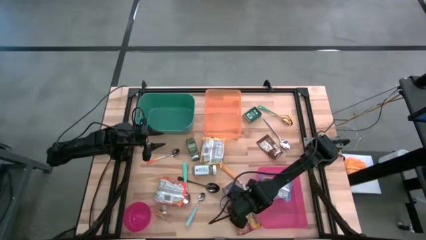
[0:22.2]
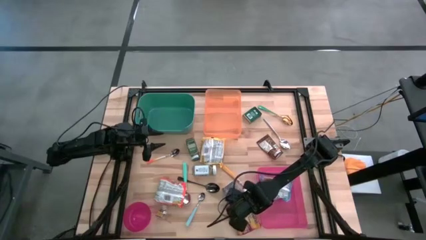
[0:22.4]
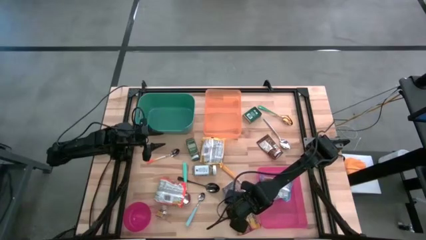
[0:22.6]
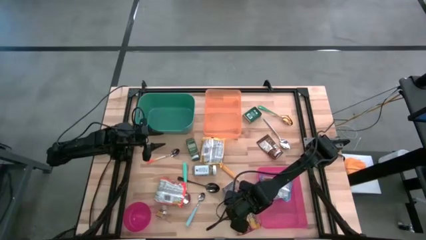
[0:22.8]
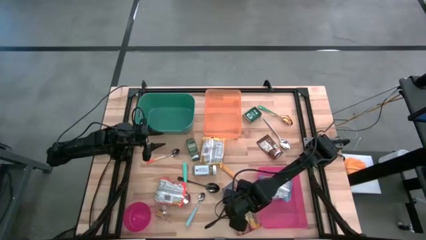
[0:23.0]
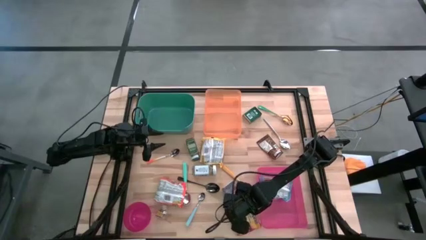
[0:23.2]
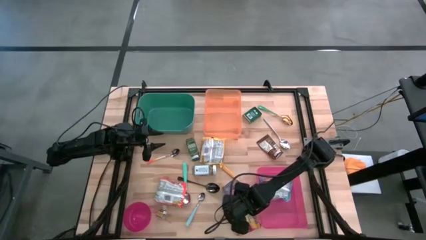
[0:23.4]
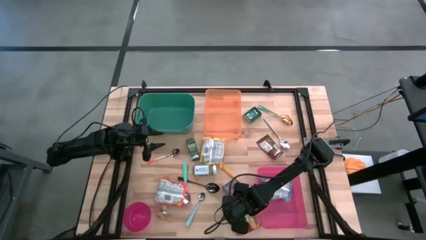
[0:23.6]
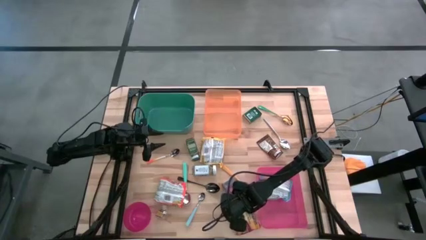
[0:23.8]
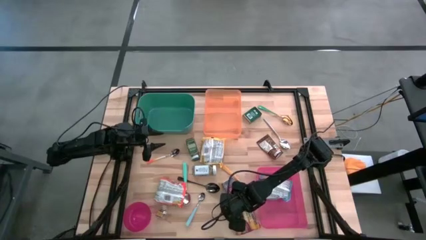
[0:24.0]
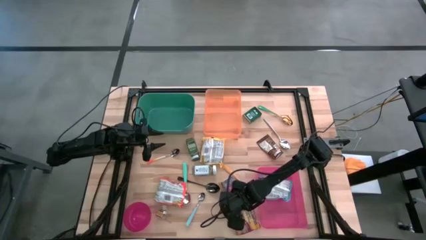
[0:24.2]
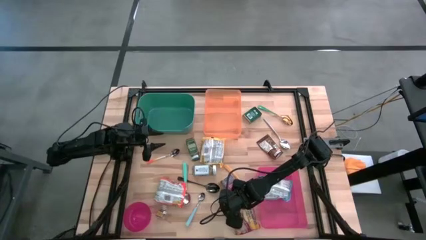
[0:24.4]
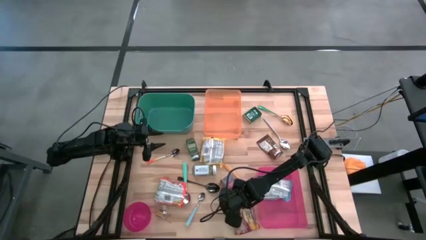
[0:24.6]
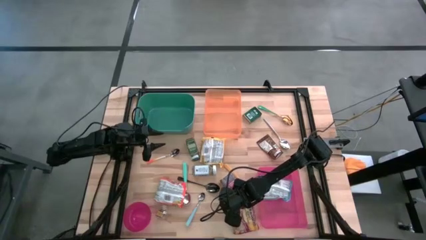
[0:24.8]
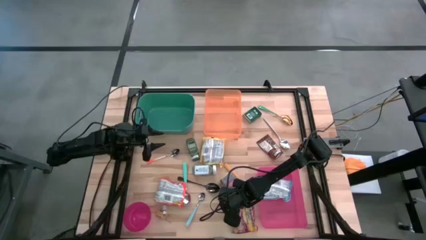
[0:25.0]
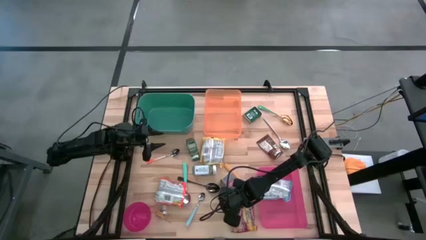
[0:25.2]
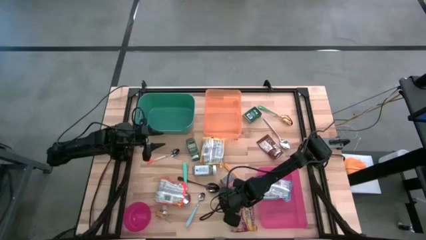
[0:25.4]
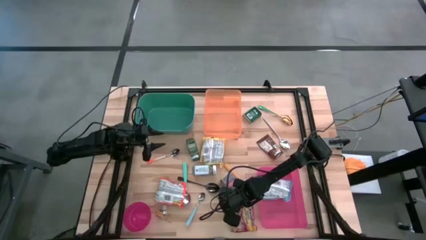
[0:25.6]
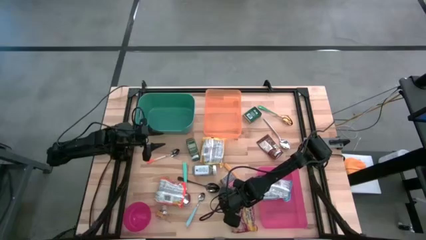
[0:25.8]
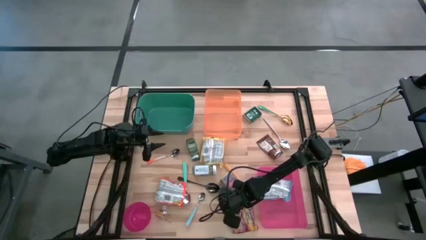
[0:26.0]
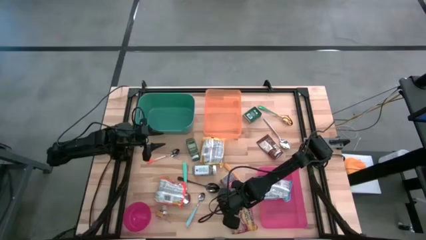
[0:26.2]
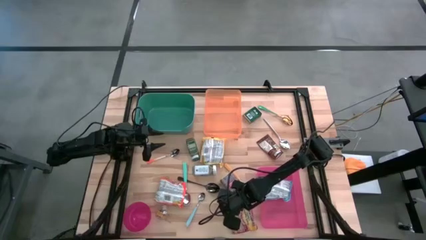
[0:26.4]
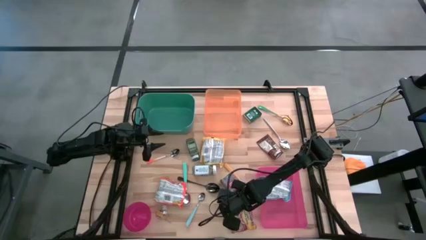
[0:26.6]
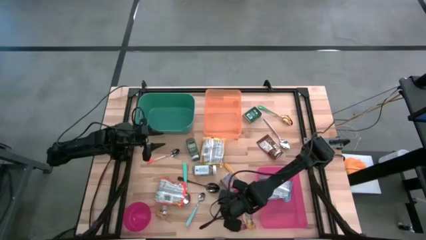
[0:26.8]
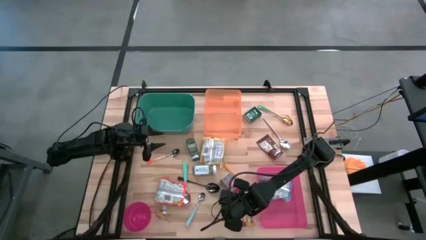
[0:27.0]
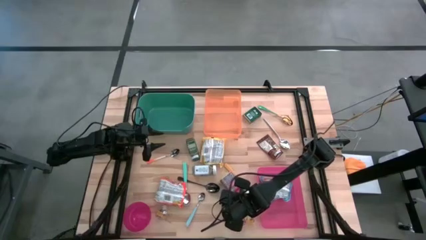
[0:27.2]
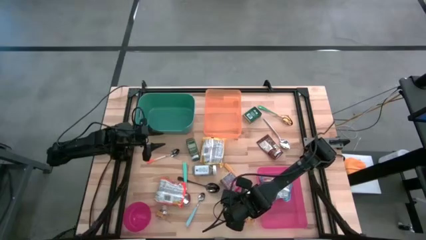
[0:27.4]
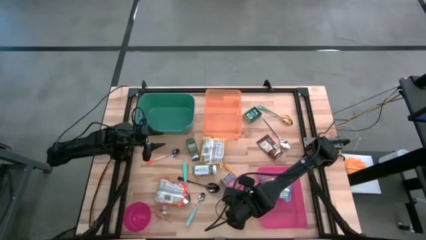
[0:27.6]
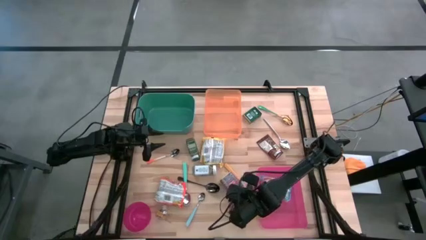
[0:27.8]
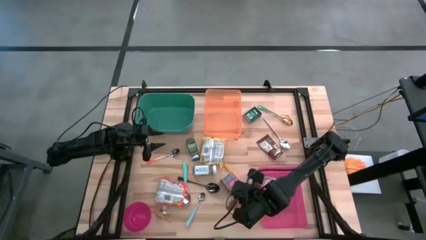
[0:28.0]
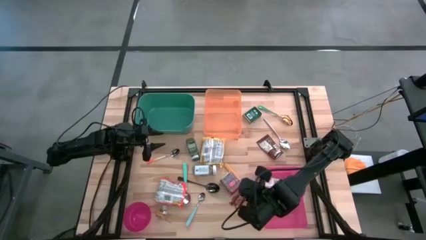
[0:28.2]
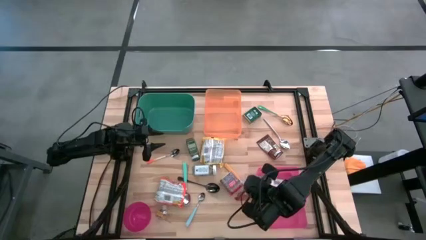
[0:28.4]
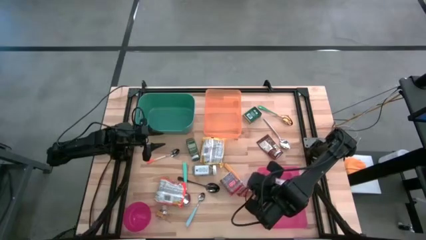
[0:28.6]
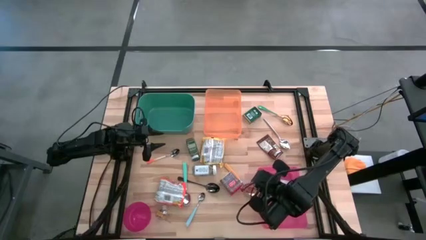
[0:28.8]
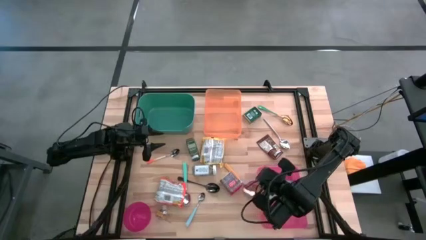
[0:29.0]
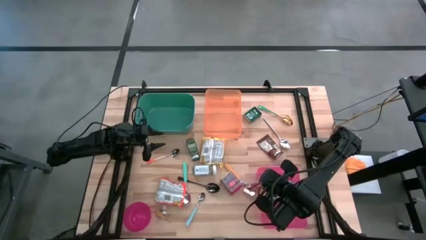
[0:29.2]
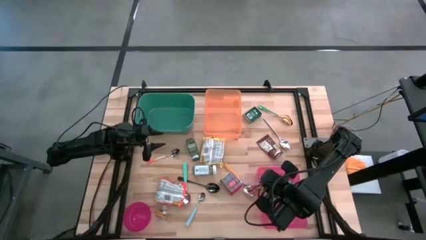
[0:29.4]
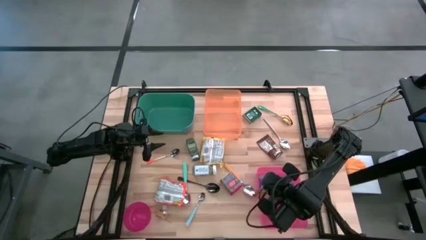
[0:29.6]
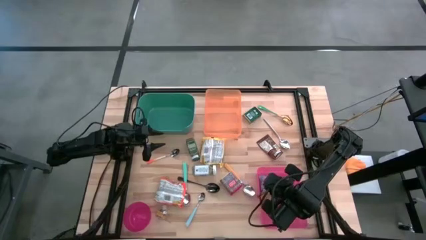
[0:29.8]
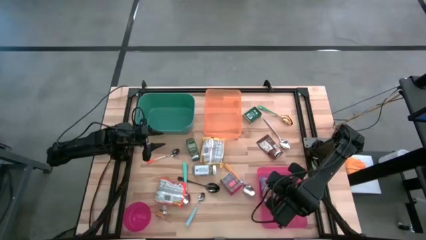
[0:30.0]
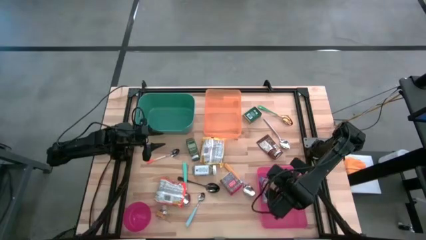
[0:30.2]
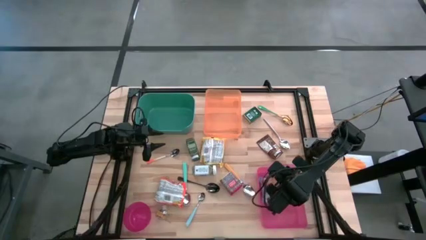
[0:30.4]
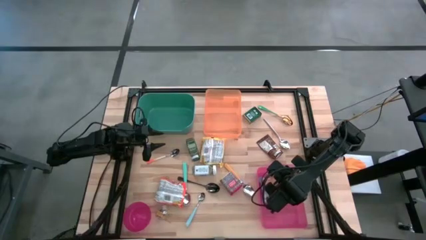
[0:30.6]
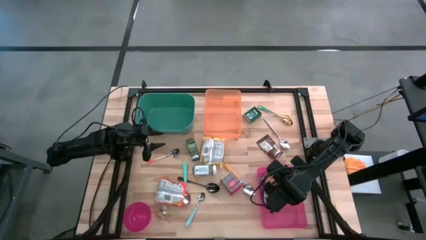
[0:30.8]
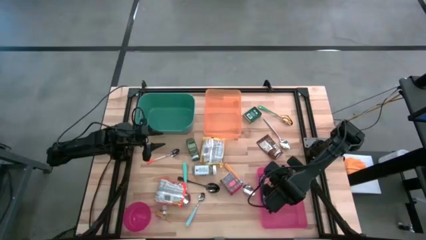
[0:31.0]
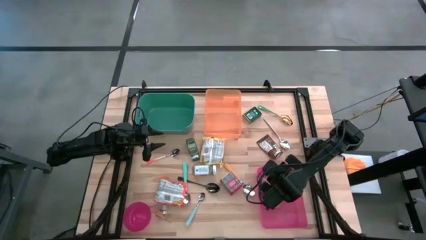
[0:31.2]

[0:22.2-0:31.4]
Put the red noodle pack into the pink bin

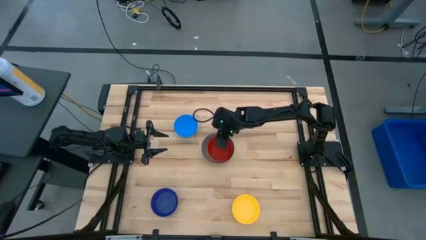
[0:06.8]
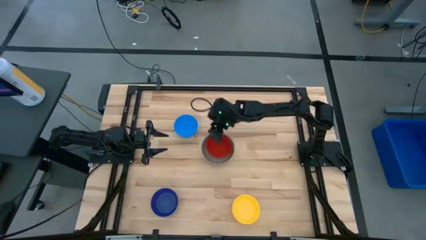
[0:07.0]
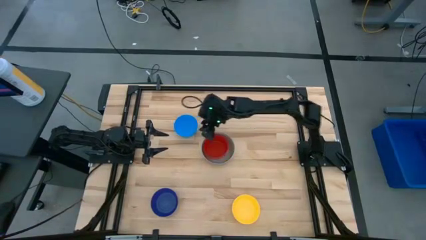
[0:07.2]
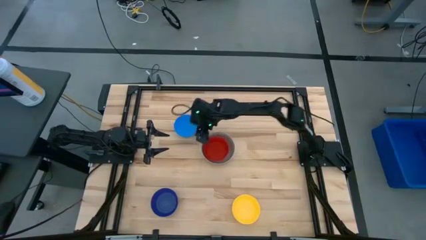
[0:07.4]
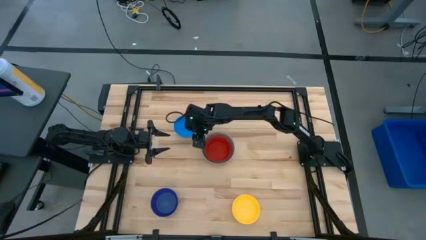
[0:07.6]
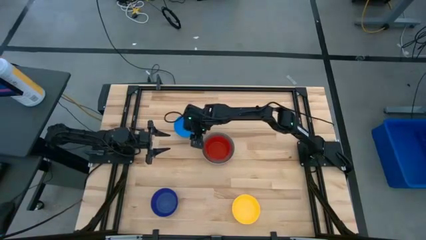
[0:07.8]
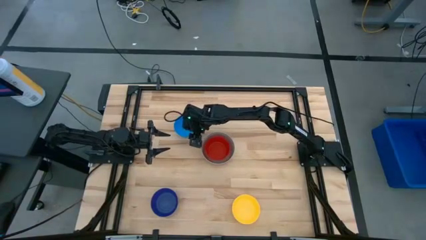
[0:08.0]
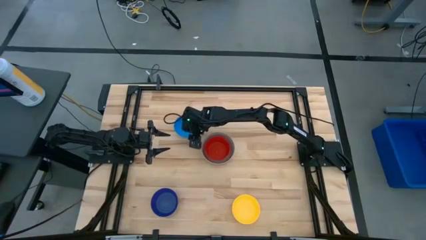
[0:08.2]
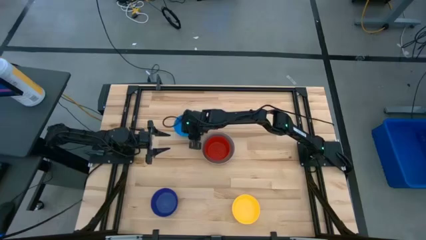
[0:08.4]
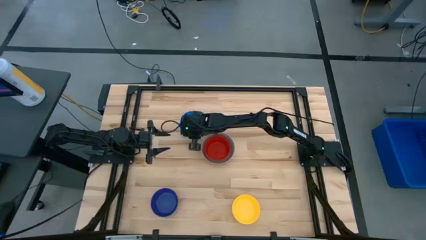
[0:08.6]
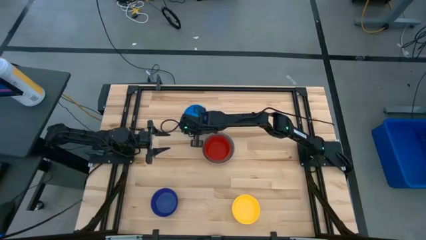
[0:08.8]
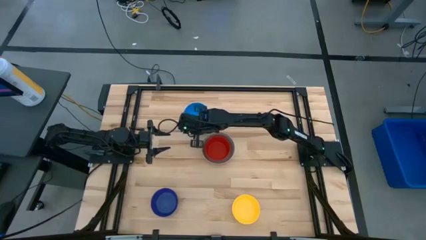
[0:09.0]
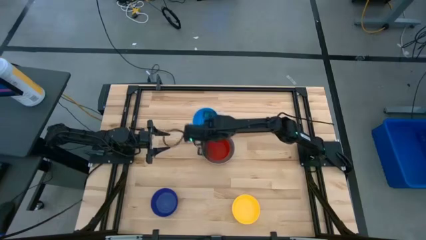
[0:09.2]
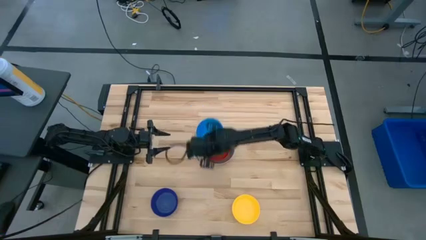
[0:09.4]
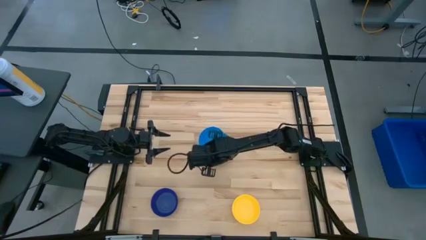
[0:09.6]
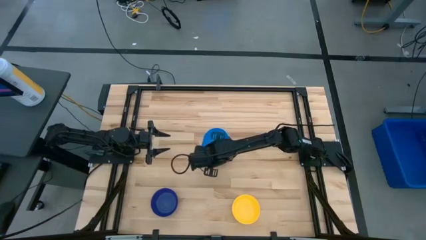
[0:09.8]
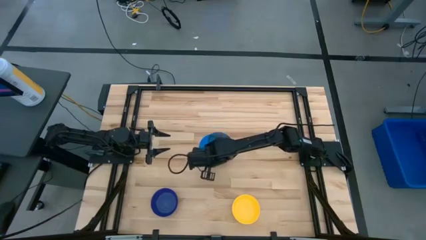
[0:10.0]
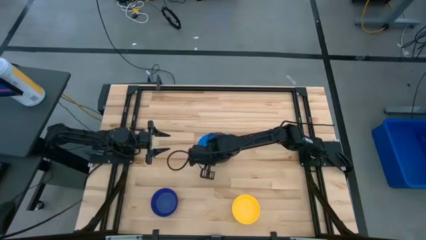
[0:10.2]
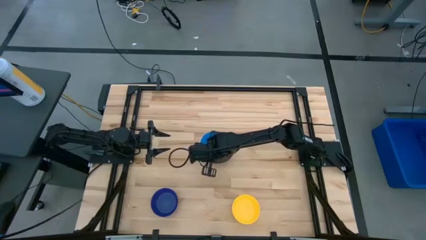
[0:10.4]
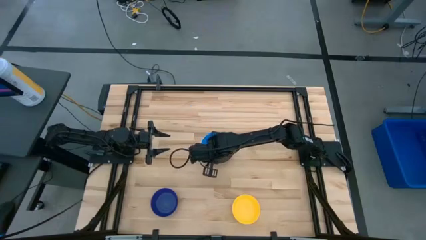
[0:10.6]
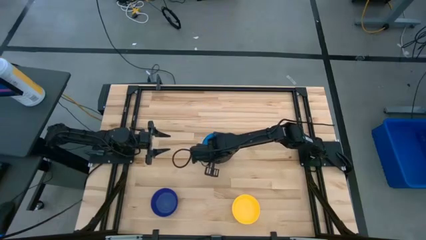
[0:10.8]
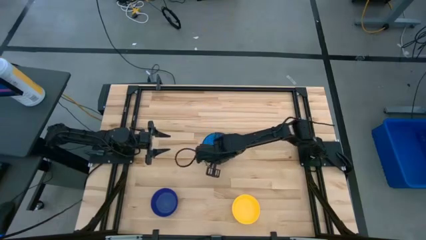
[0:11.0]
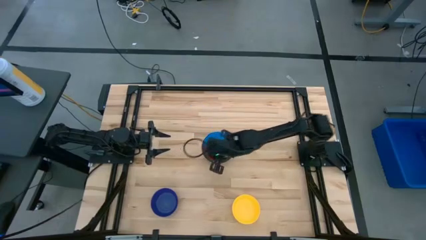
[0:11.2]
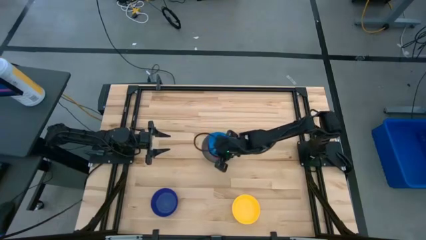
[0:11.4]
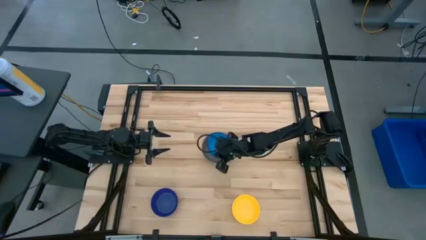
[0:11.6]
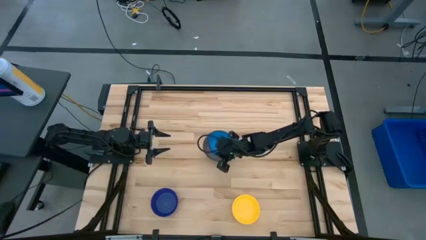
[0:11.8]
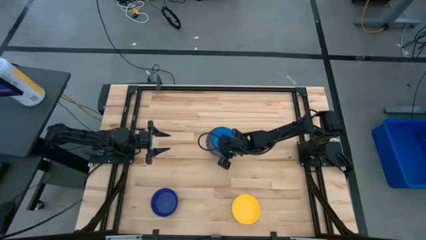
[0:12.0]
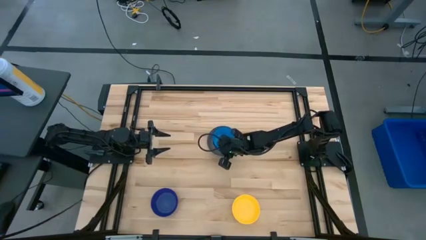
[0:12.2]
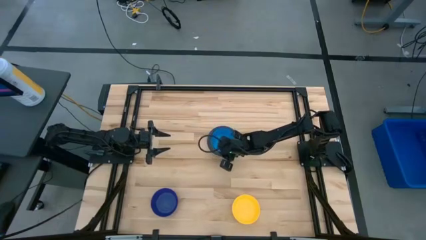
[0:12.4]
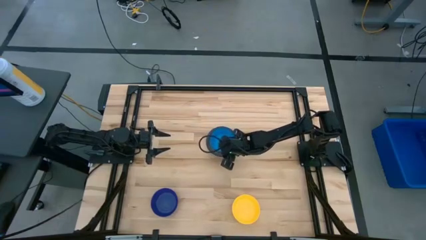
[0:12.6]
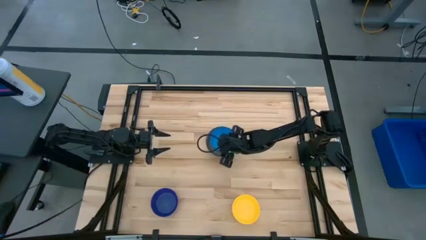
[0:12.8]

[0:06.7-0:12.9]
Stack the blue bowl on top of the red bowl

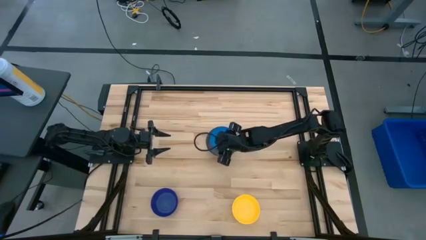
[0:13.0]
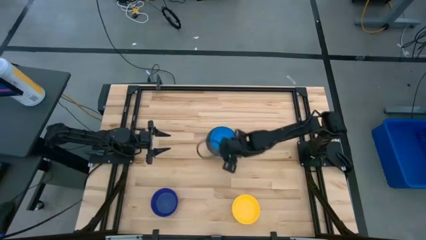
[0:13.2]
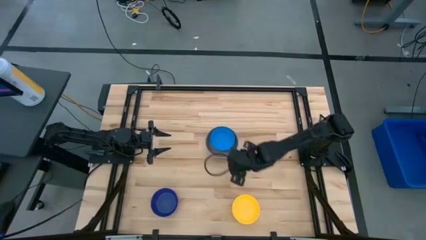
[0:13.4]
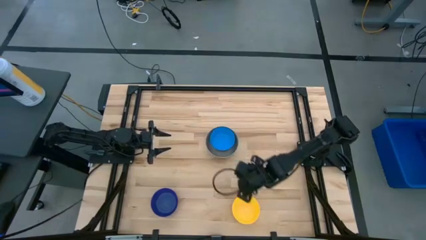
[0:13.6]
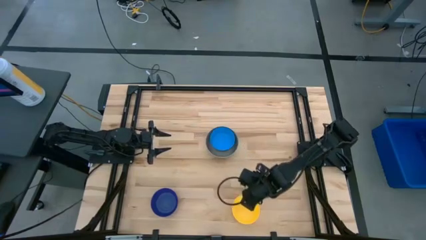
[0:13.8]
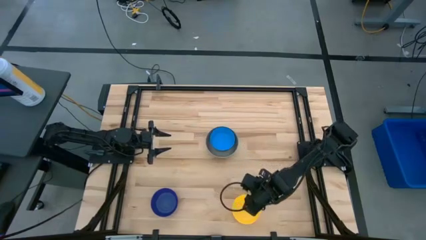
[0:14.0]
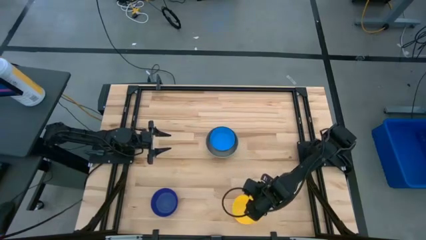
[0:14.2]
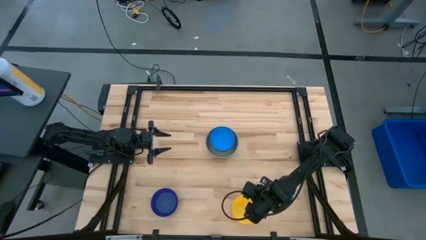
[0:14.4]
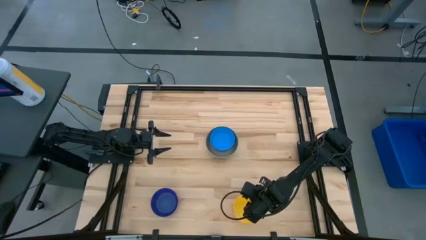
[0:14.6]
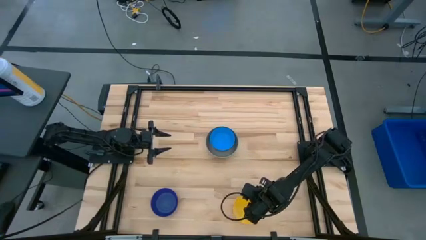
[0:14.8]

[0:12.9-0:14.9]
Stack the yellow bowl on top of the blue bowl
